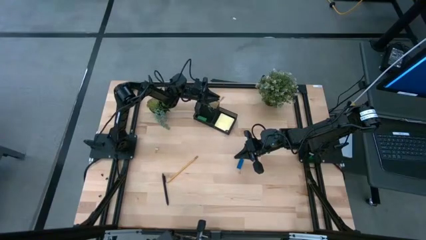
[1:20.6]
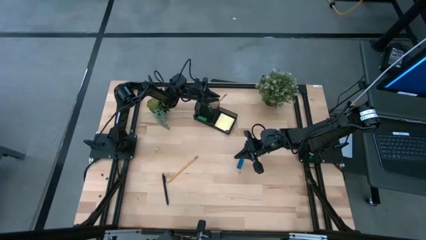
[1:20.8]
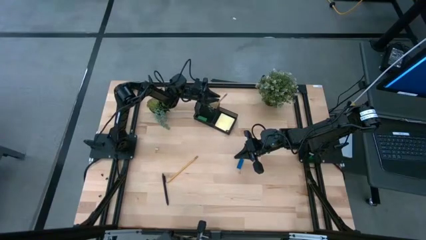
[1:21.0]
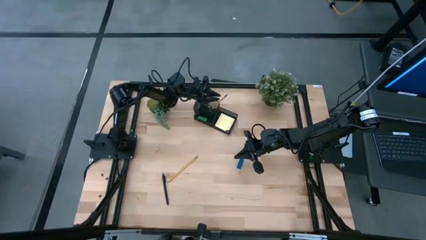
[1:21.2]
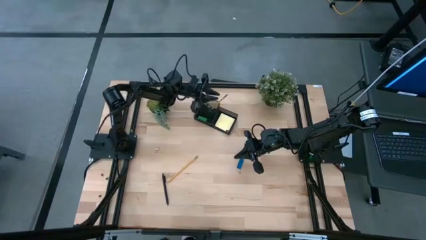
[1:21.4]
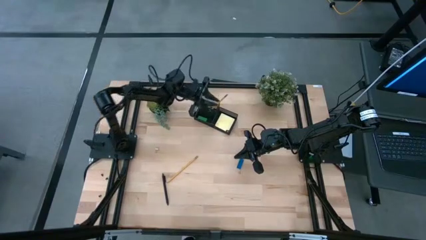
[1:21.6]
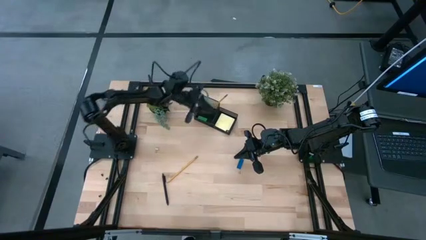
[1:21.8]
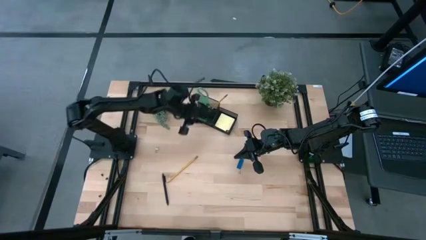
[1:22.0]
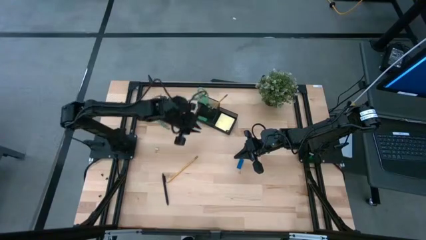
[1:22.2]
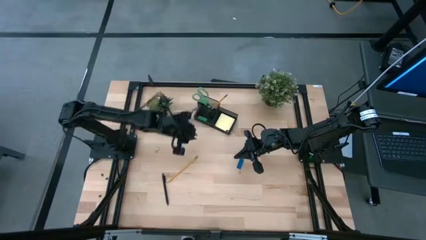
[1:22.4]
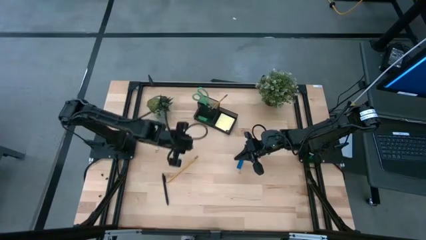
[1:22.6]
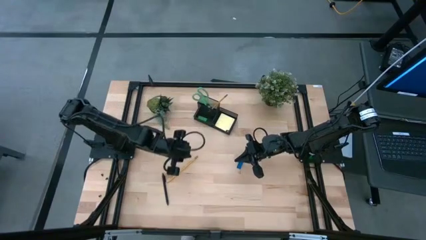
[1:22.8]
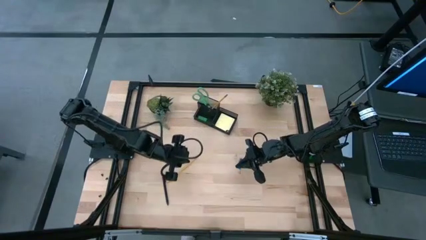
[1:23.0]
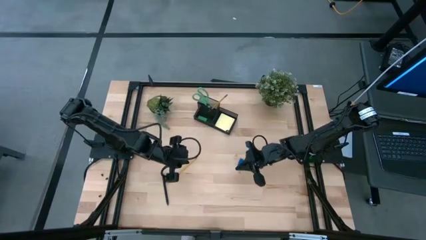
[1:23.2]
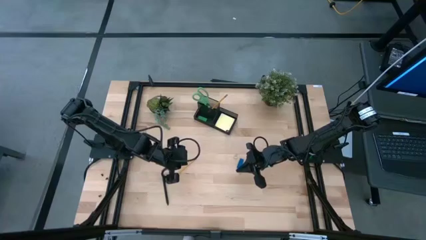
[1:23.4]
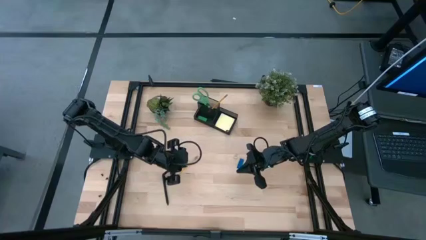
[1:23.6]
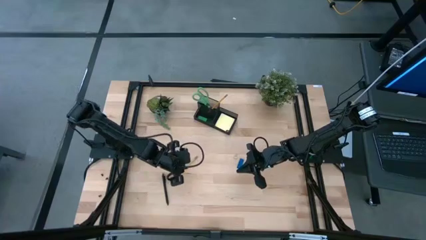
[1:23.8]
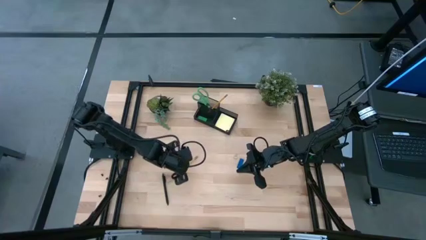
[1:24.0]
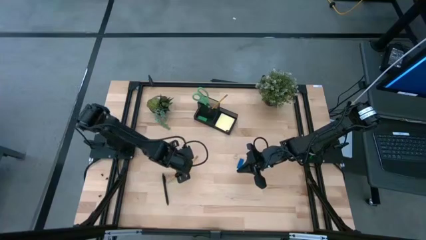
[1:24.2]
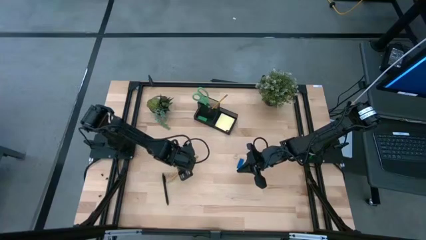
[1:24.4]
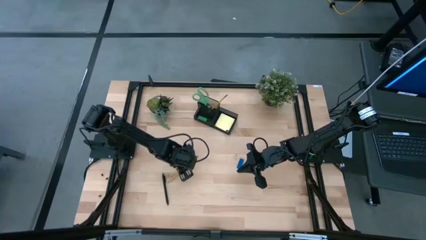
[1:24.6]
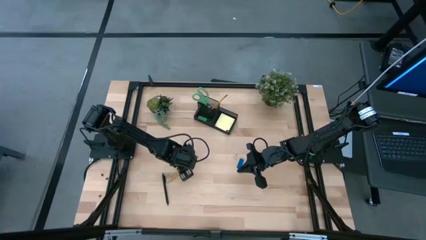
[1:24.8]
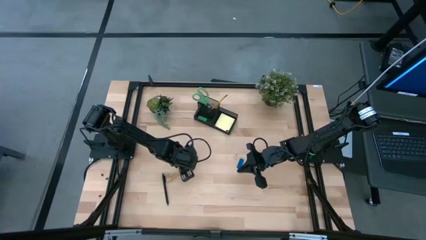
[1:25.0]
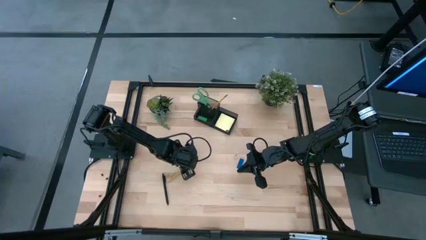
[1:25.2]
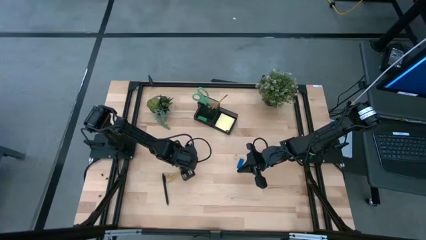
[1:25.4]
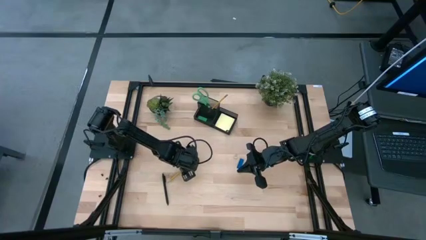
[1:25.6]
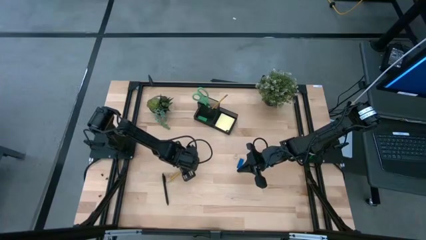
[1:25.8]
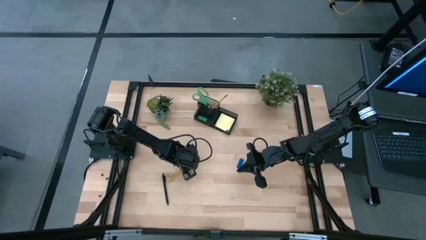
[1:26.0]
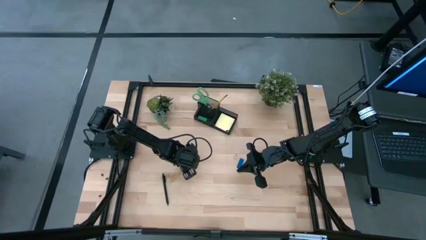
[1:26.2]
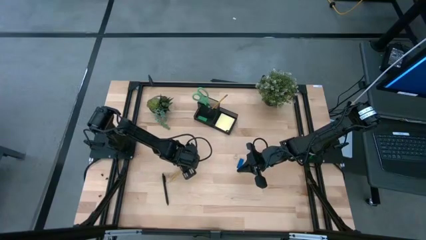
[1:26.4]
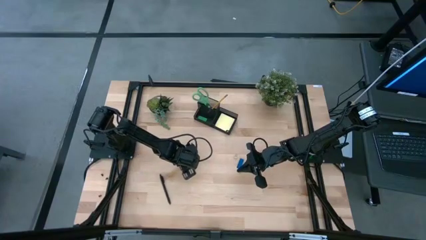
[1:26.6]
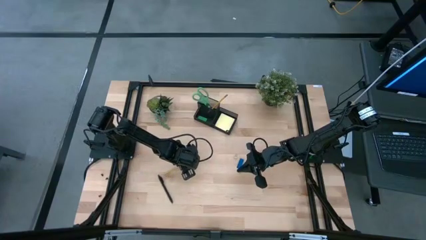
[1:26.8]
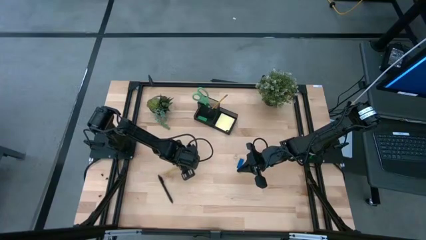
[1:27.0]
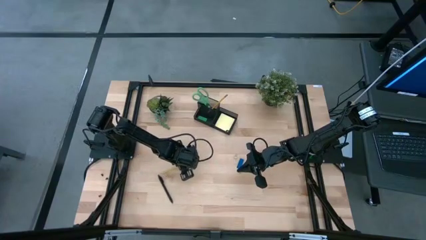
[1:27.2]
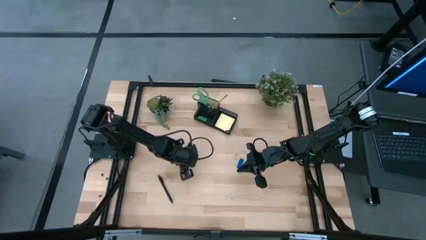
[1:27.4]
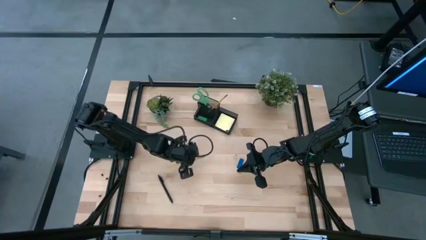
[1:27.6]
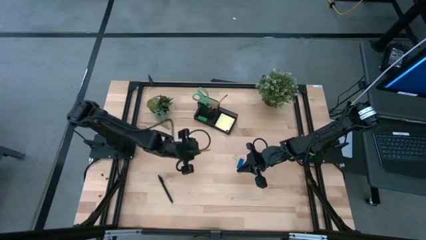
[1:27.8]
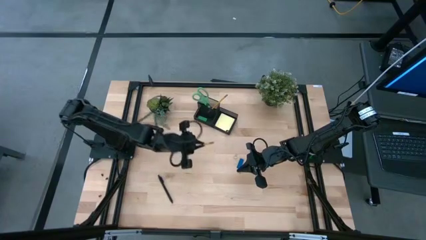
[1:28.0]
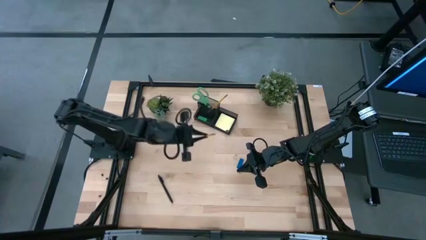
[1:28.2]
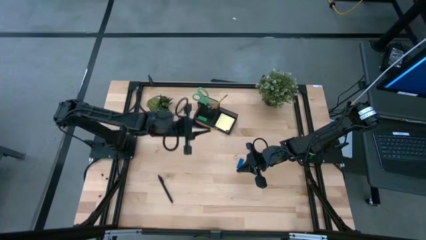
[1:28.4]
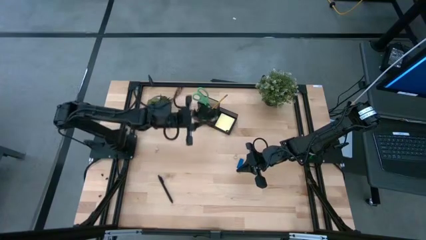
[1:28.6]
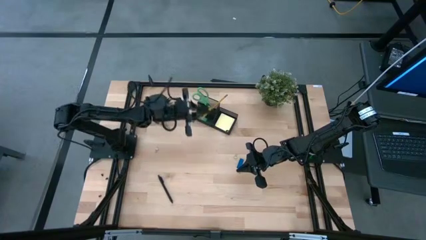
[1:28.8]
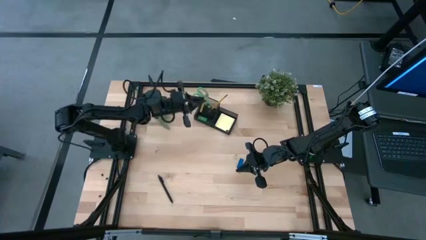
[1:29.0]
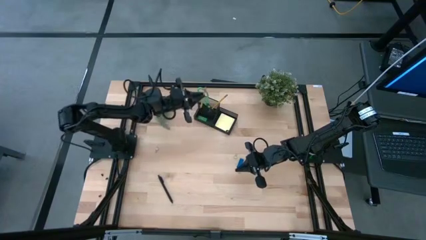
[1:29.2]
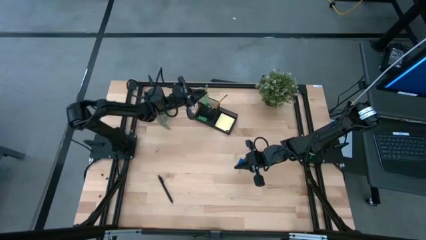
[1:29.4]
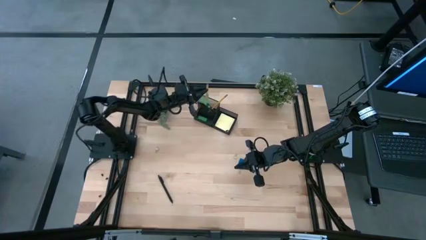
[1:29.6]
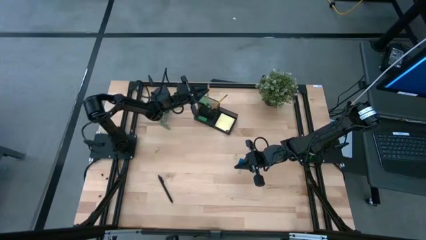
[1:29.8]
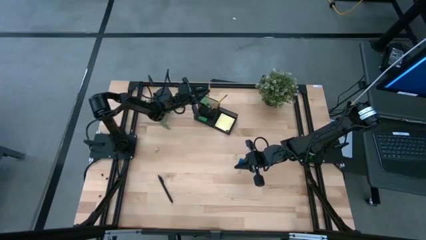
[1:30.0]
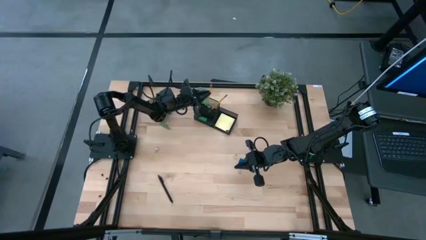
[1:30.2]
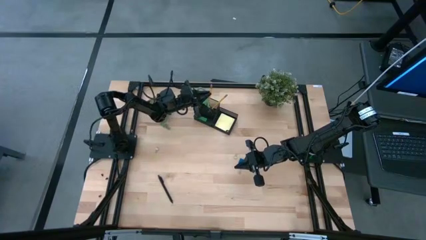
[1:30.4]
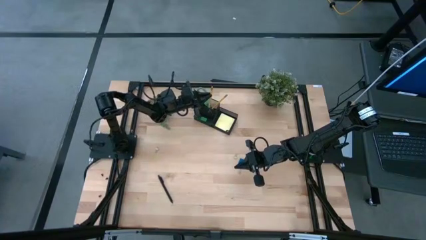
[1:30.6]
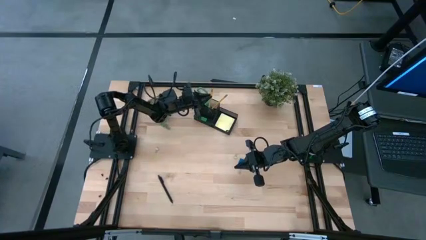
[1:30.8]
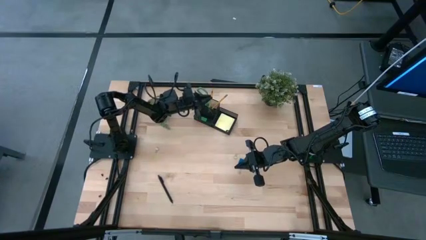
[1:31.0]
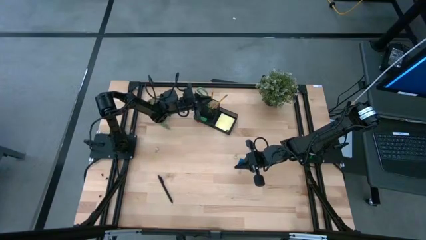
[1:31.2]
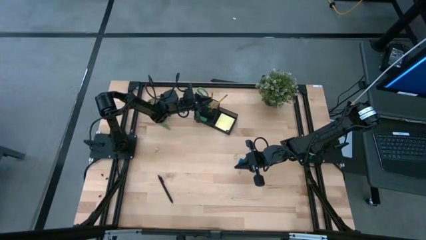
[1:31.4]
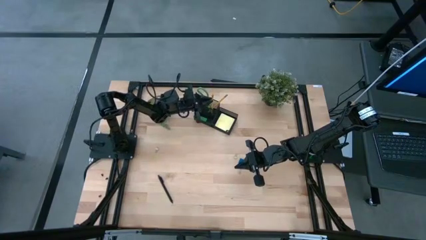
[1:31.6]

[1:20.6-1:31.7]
Task: Pick and place office supplies into organizer
Put the pencil into the desk organizer

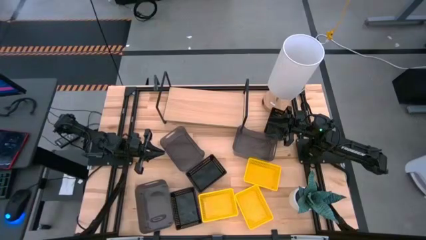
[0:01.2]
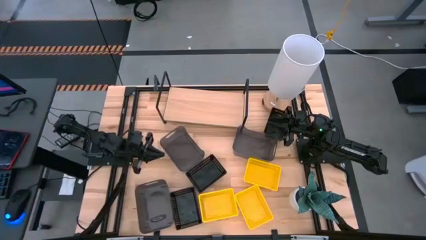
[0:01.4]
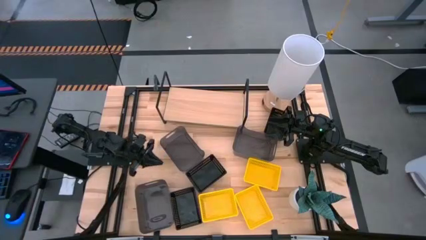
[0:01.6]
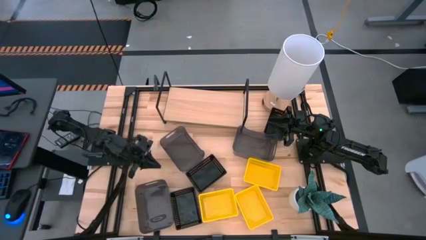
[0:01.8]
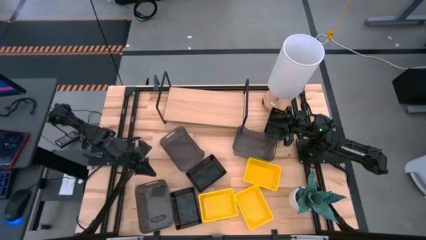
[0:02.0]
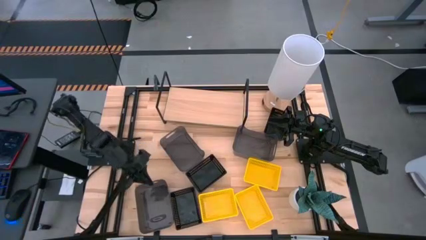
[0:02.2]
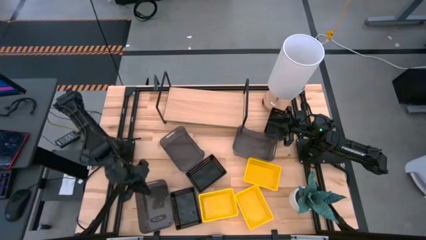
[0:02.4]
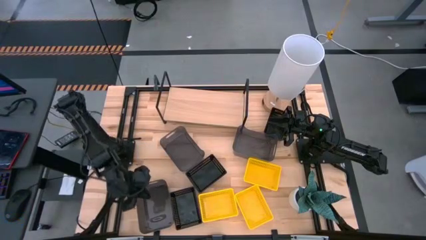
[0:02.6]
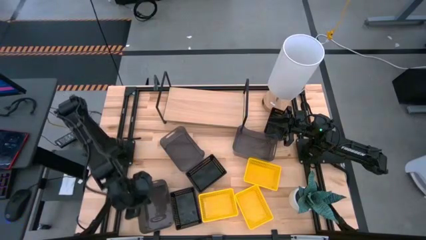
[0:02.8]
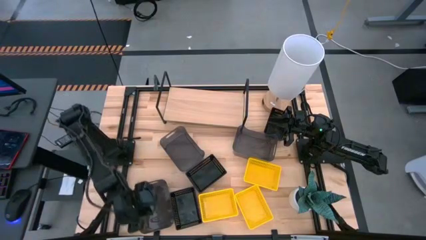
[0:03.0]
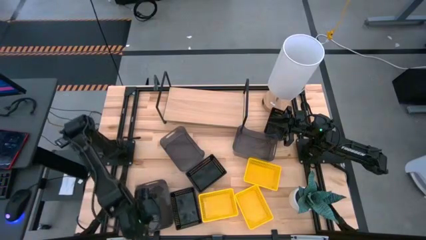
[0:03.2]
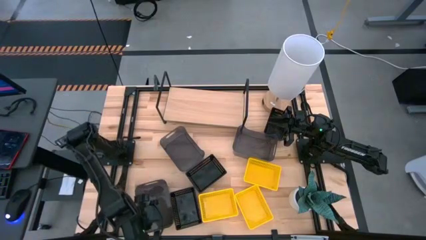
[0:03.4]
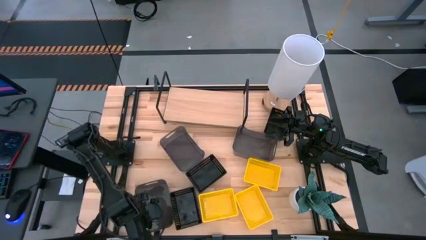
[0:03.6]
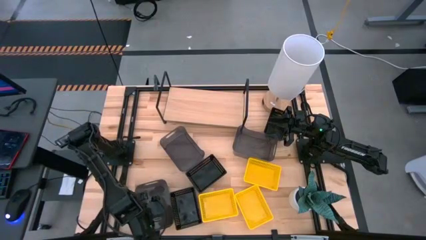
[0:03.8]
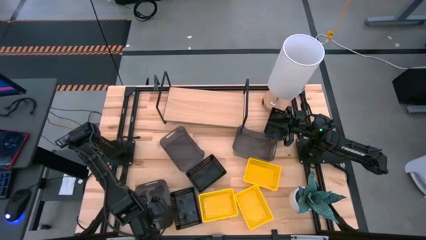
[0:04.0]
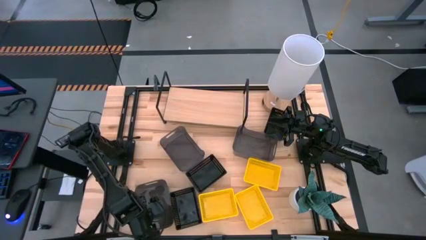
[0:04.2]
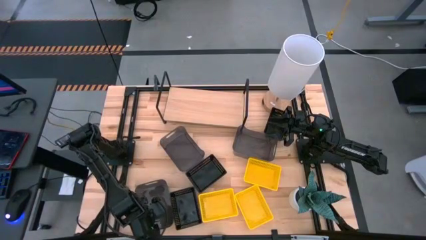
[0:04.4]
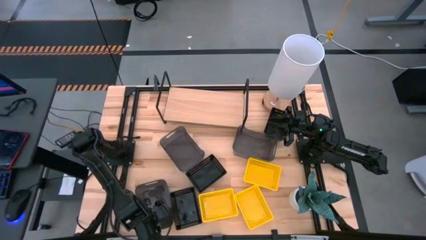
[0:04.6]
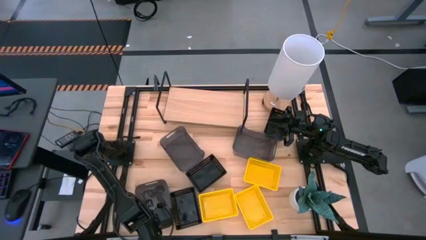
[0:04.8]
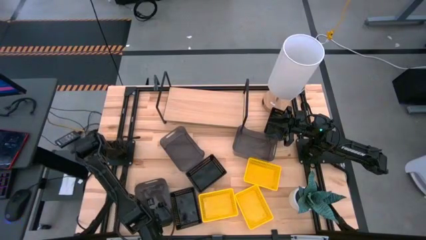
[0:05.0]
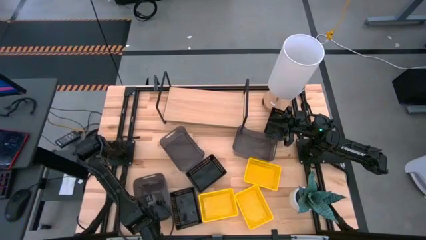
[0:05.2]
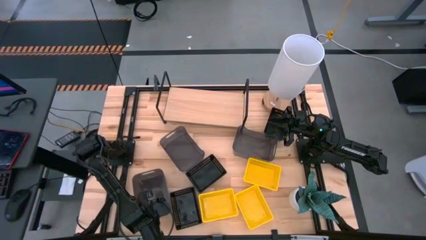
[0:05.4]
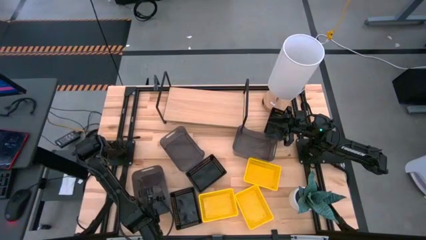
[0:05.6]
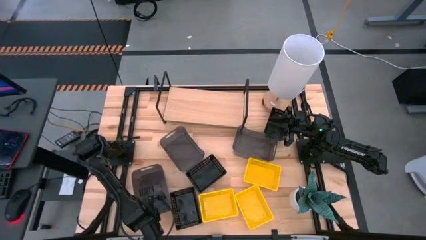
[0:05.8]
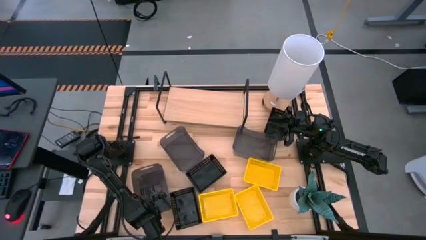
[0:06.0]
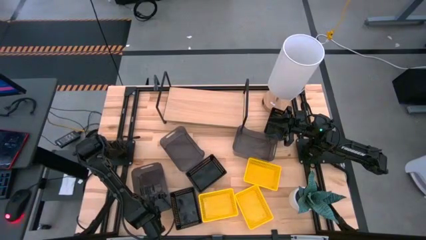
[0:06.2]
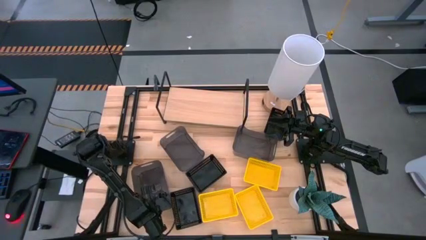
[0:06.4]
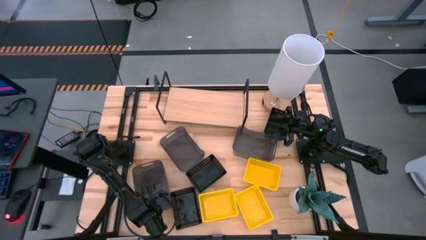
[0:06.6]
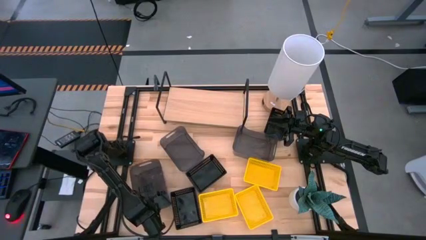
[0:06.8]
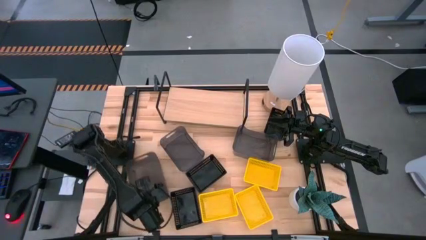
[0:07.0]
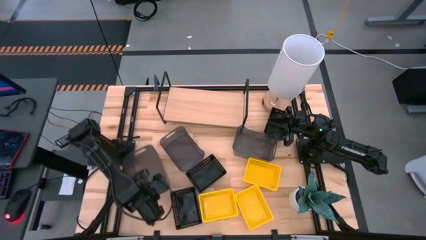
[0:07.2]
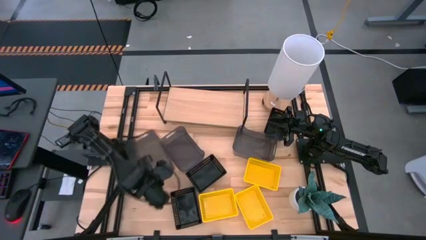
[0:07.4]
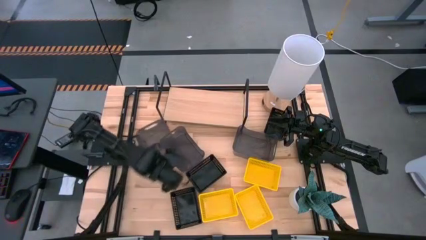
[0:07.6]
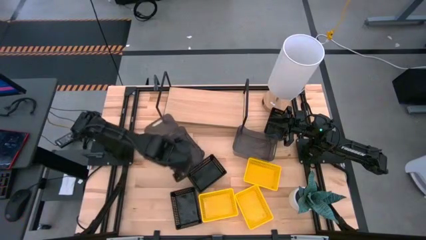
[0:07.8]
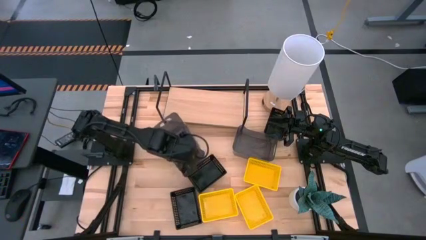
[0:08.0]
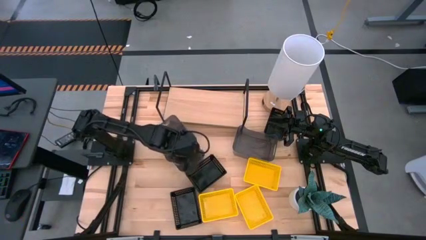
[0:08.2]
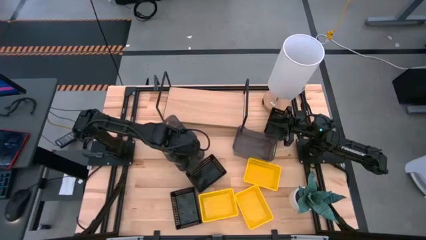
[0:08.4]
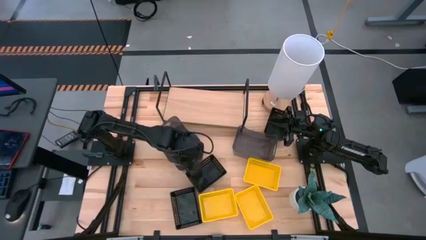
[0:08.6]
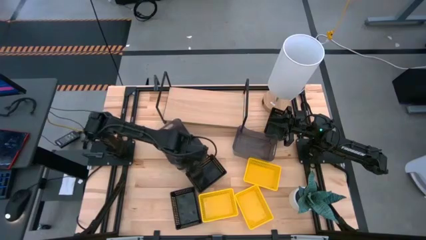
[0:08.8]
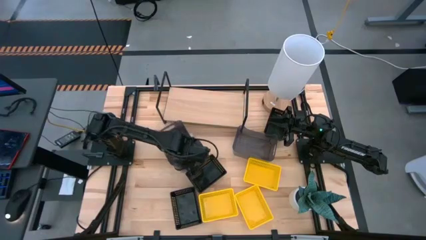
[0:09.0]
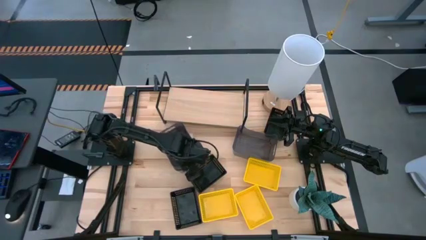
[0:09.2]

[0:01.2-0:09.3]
Task: Stack baskets on shelf by color
Stack the bottom black bin on top of the other top left black bin
